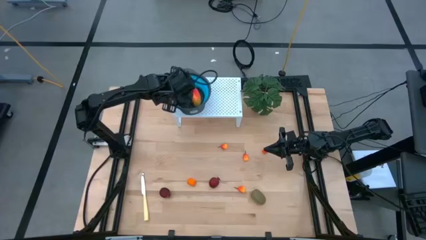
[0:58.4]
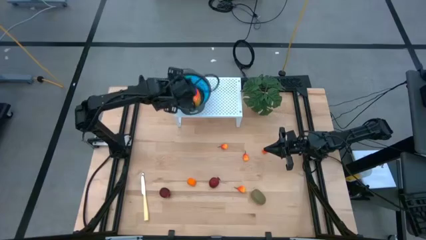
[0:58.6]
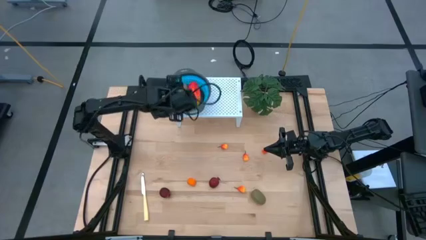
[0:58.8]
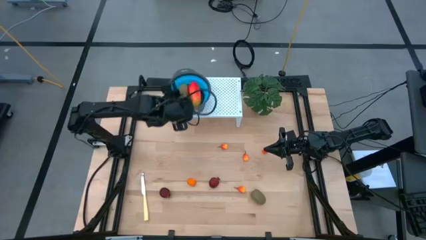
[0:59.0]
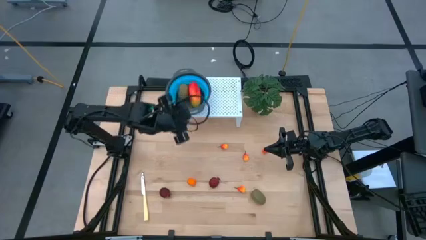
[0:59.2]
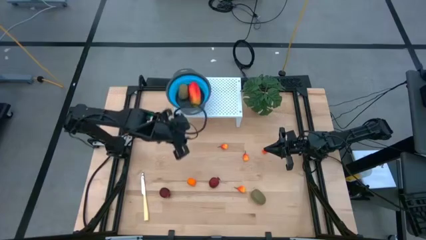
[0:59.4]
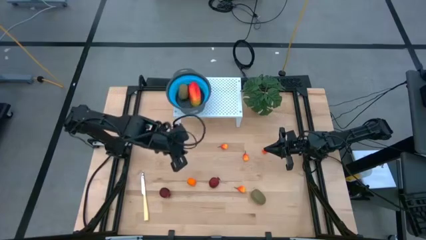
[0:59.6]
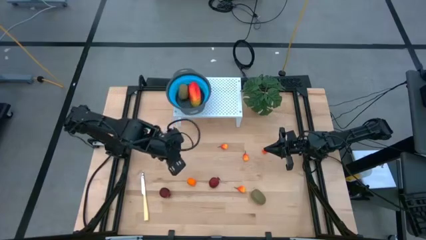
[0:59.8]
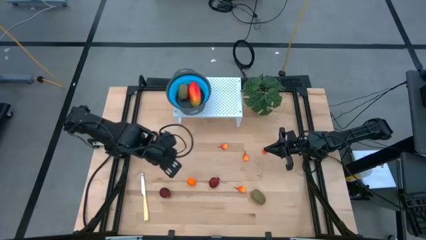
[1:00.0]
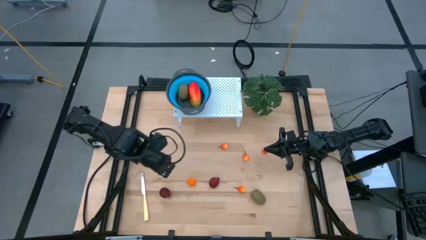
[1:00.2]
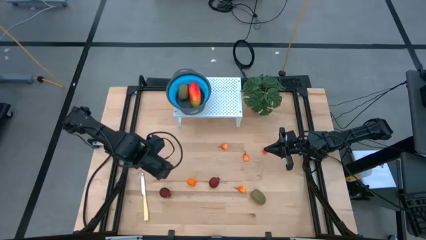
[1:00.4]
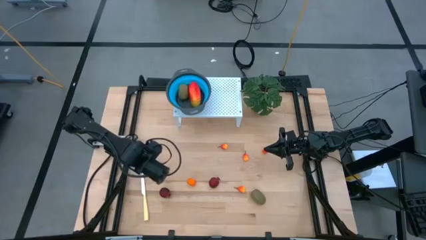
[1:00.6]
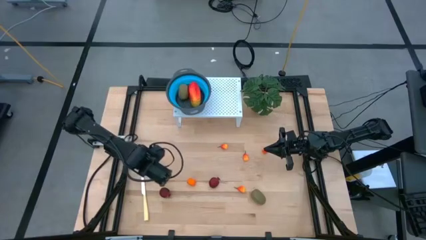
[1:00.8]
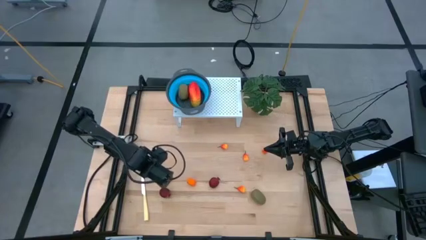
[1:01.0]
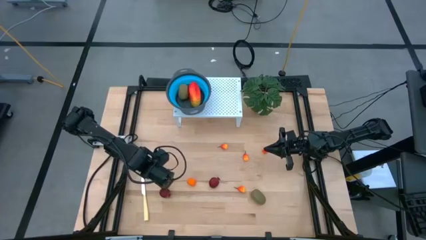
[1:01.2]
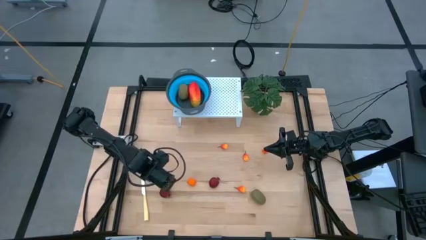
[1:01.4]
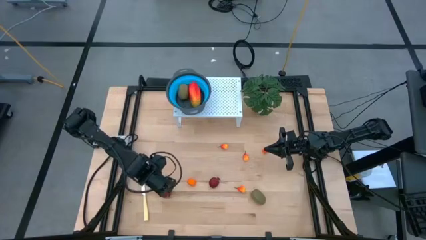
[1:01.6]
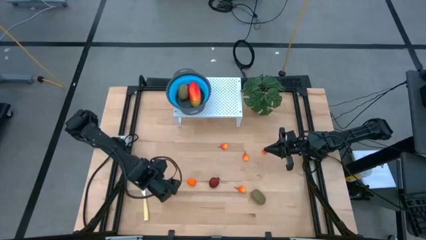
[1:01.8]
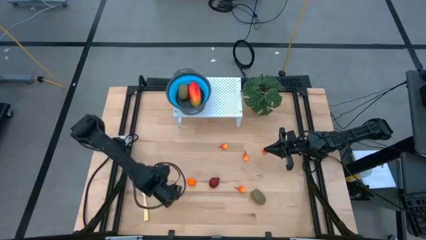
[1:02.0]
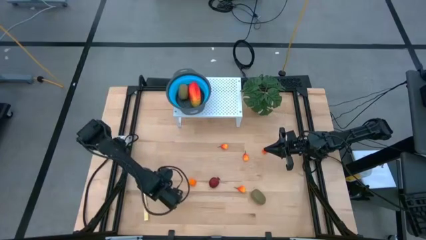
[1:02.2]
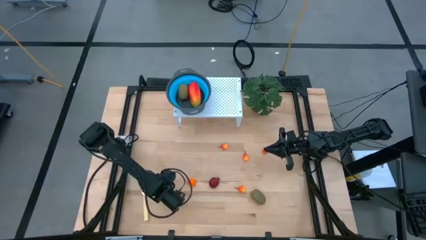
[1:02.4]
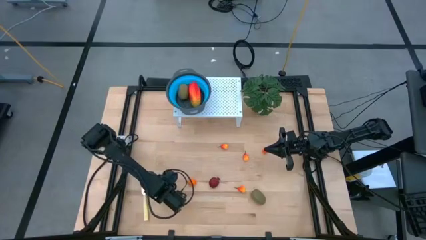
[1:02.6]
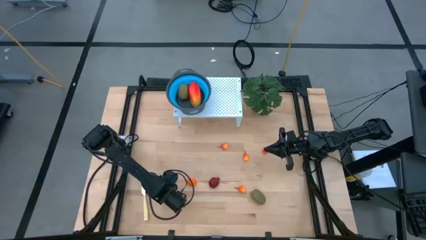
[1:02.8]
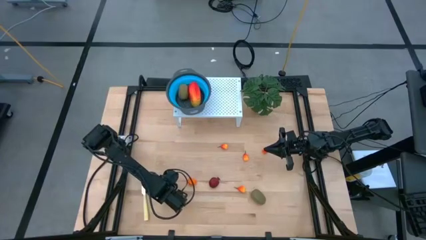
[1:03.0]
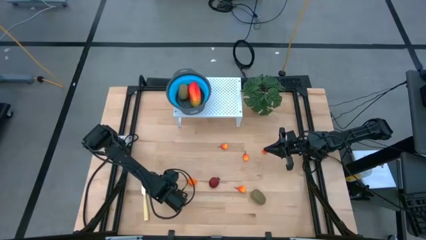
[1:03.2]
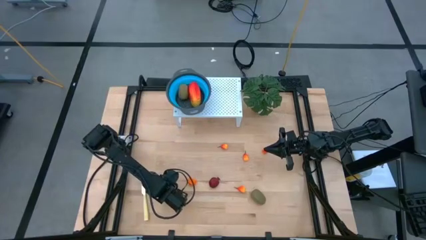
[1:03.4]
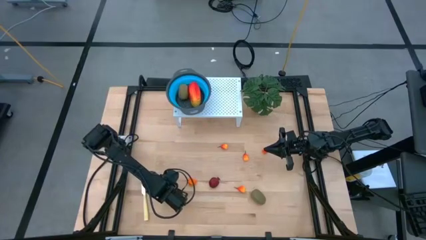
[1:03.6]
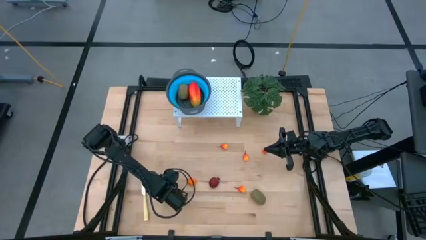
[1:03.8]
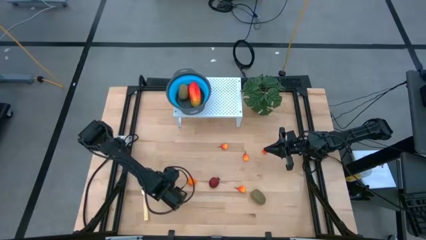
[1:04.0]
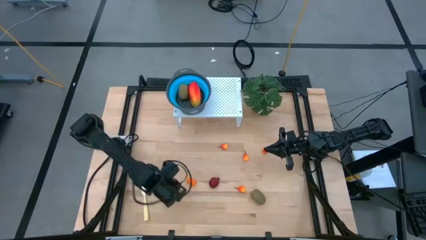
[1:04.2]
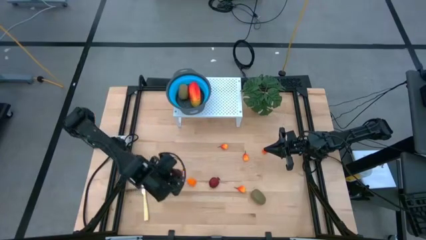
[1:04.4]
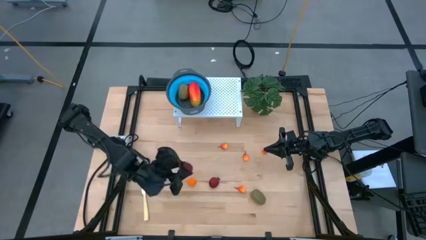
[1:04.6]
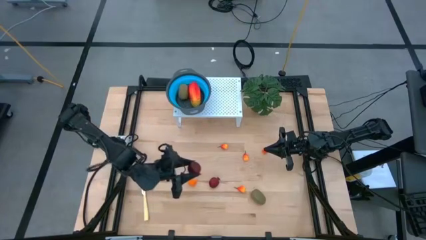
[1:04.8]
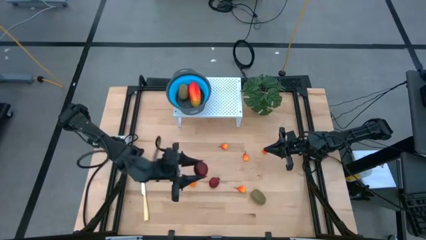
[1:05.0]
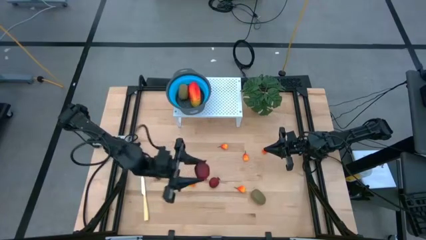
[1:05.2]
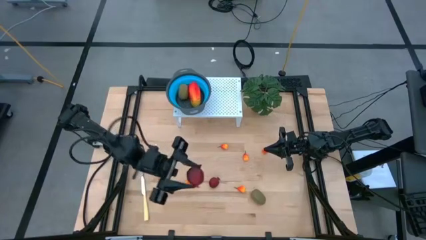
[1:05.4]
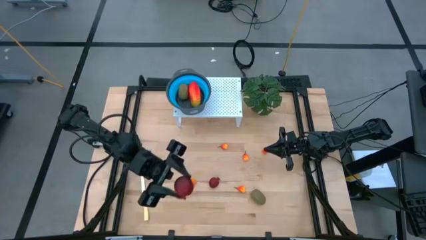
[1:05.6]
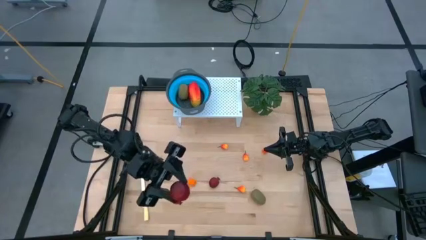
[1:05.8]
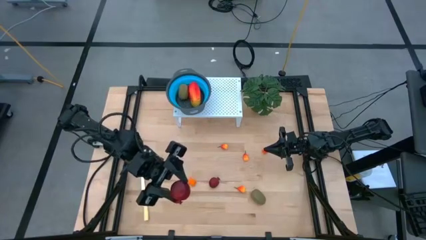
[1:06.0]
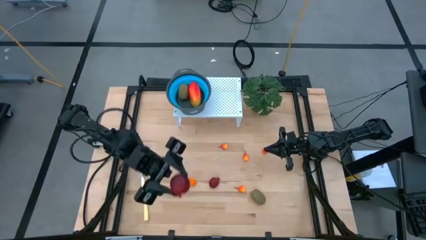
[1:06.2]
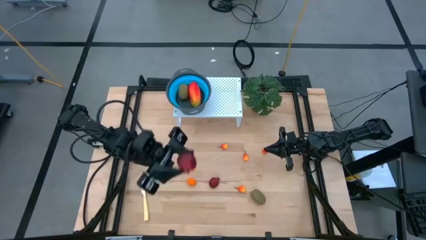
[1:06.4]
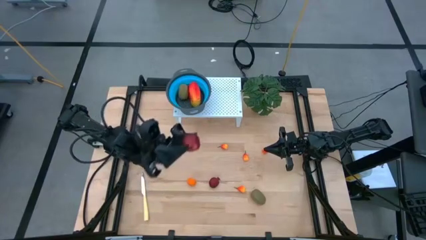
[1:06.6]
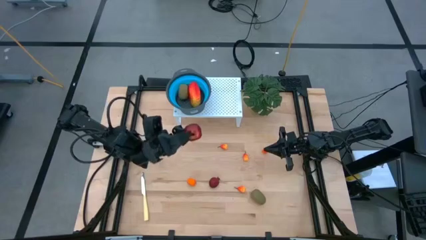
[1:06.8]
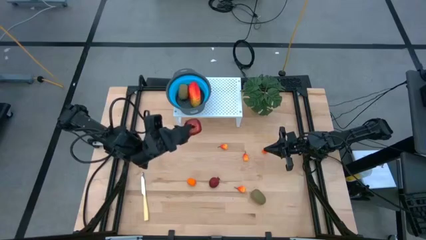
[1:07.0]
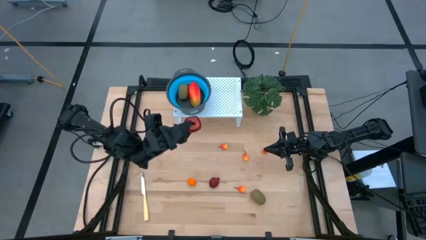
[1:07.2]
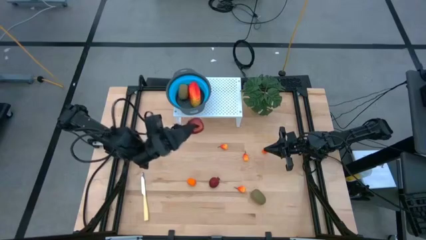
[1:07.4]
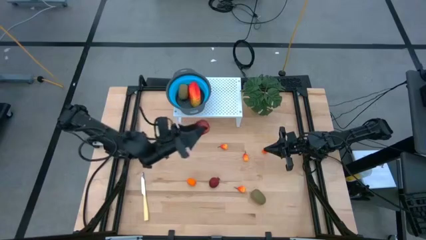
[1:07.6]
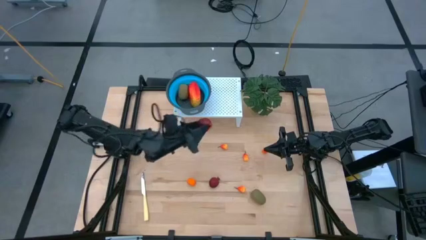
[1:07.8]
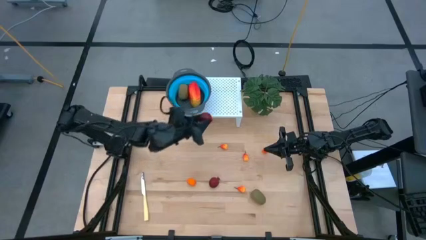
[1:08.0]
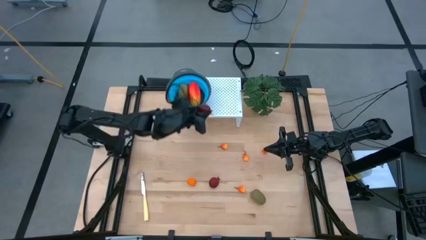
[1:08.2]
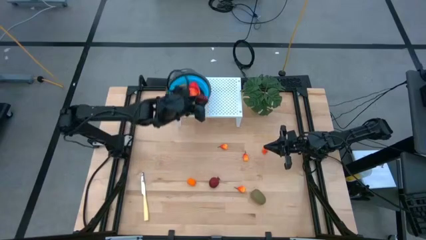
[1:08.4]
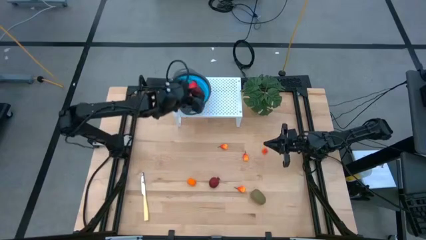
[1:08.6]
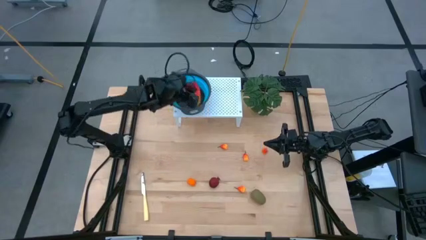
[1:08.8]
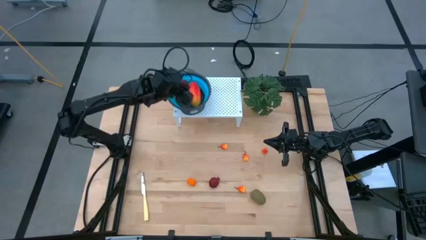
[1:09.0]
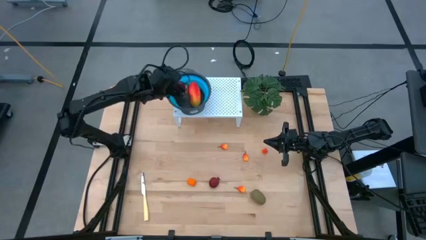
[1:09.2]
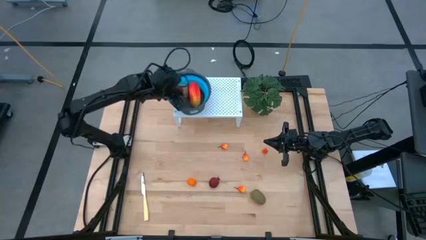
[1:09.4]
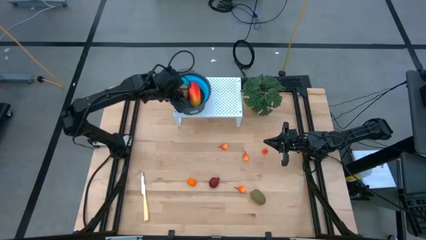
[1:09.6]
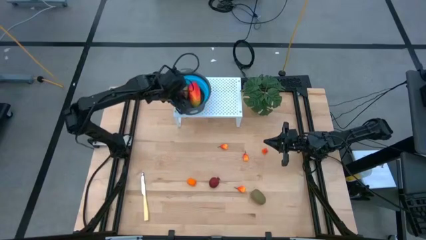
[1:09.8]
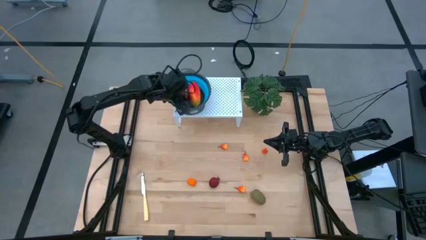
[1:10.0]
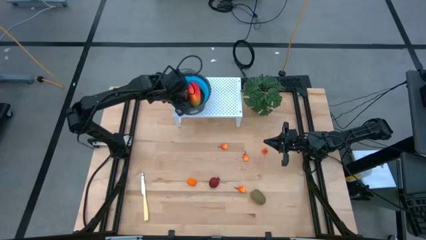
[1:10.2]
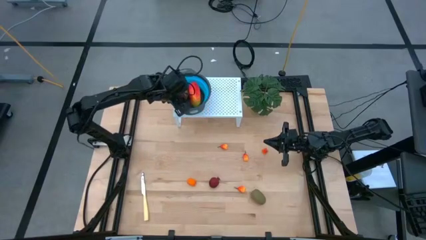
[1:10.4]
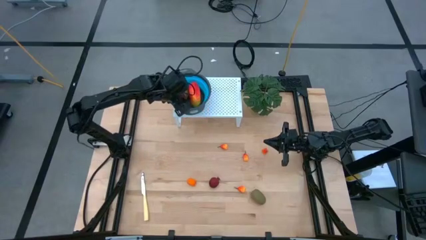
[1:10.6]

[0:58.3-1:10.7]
Task: Pick & Place Fruit
Put the pomegranate in the blue strainer bowl on the shelf

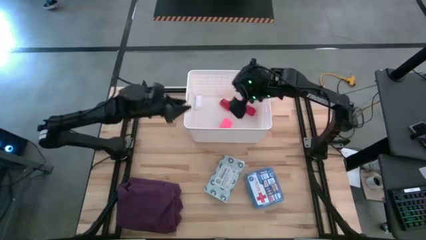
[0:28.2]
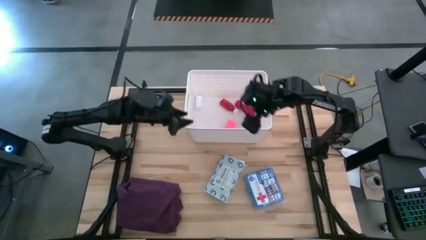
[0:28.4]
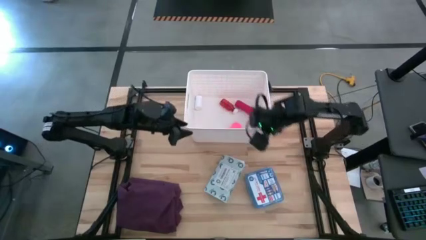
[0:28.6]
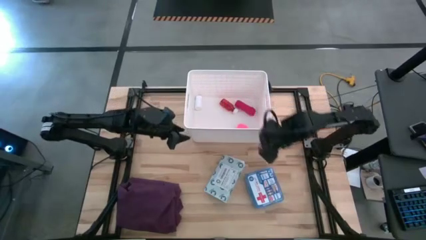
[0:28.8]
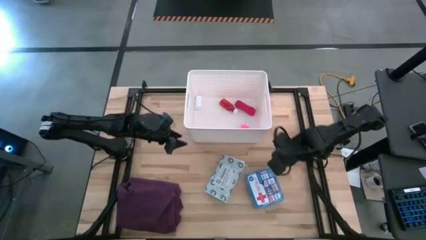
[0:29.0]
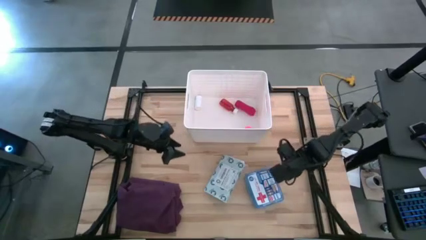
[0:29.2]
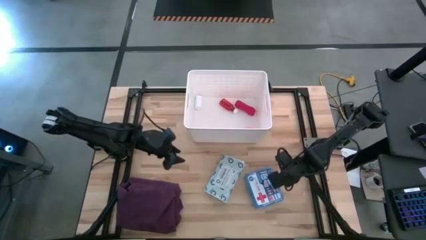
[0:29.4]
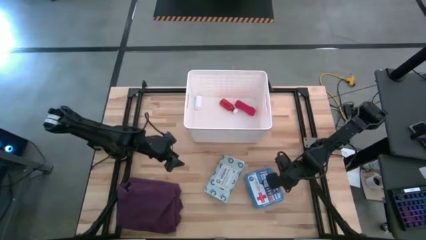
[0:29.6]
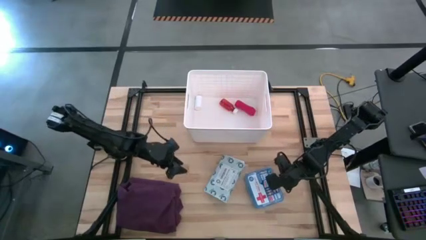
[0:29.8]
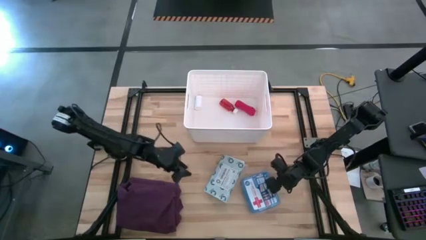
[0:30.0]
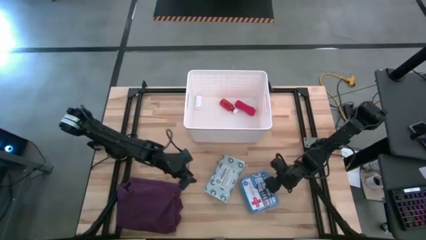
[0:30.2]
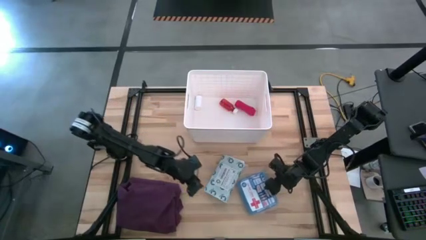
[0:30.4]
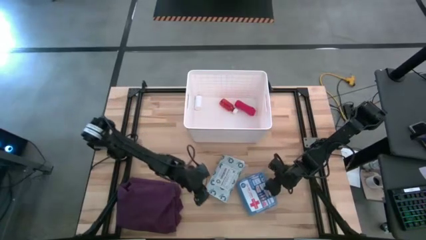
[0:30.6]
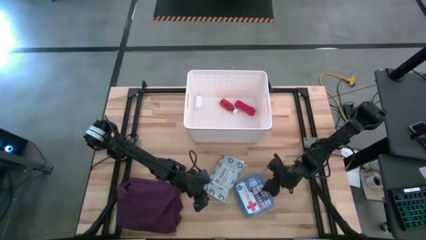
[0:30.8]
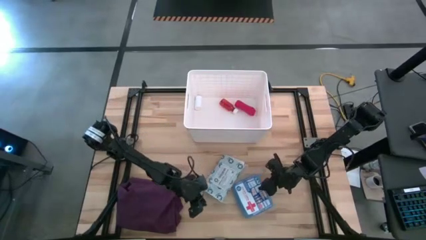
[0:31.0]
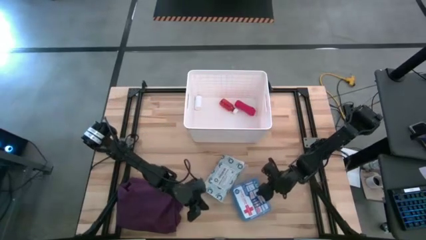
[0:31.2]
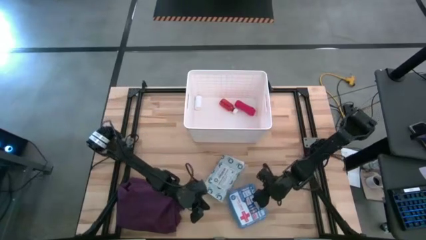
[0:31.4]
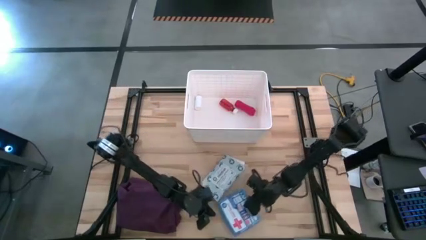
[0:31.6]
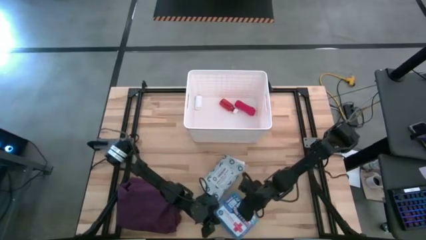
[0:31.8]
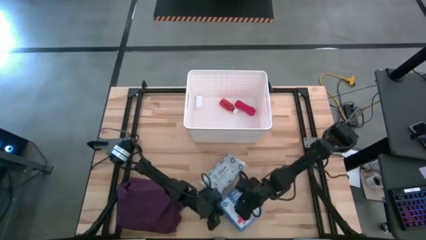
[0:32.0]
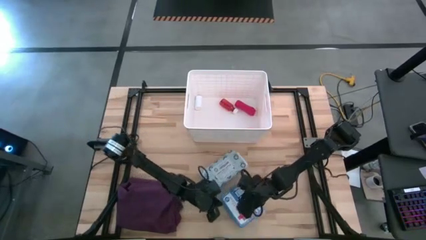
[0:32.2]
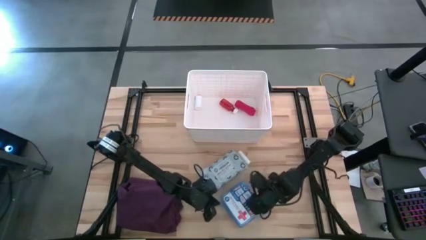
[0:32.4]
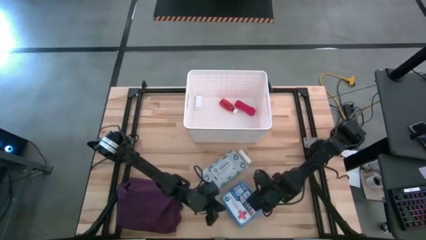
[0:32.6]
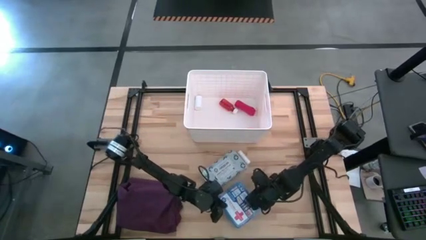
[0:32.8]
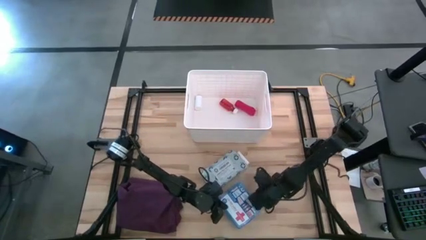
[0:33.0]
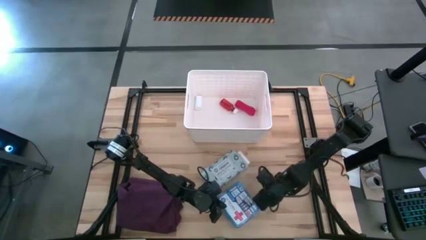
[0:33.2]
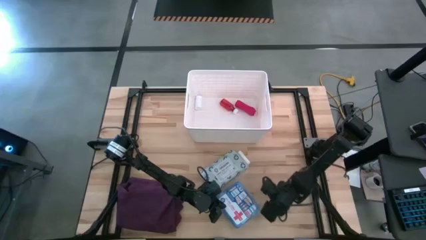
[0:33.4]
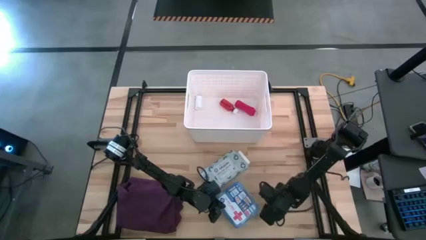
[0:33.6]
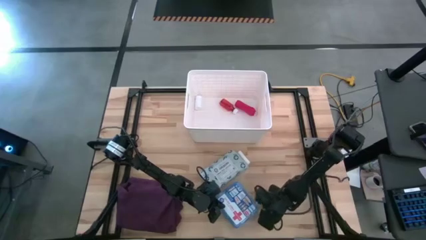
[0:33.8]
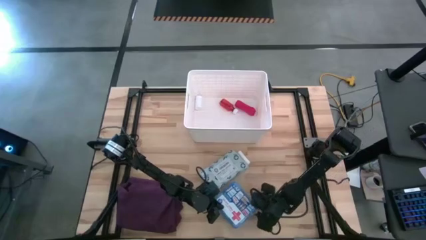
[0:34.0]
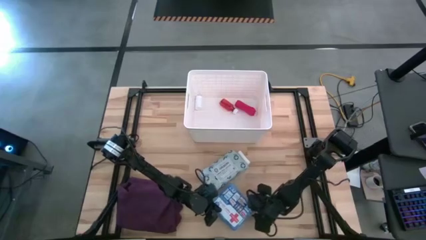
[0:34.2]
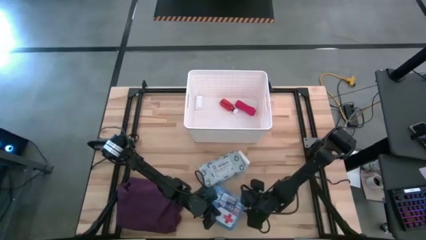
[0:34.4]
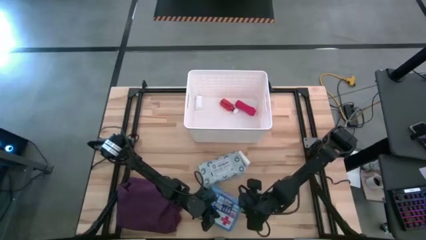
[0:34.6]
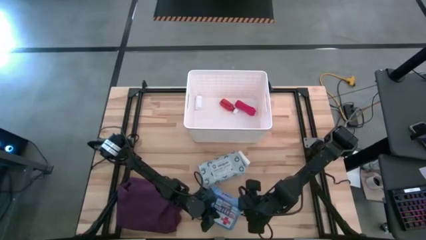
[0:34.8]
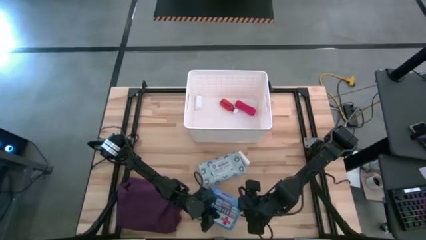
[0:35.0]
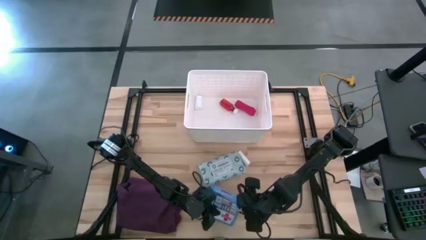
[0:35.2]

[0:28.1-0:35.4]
Task: Pick & place medical supplies in basket/bin
Put the blue first aid kit into the white bin
